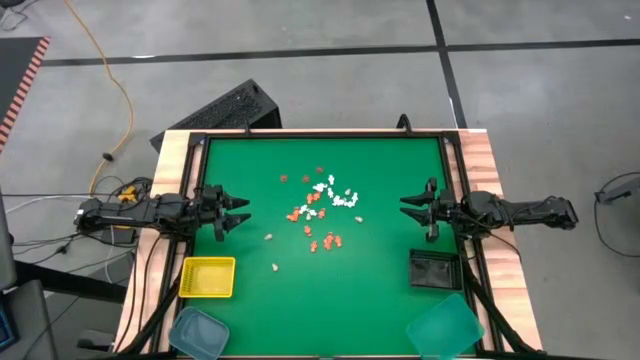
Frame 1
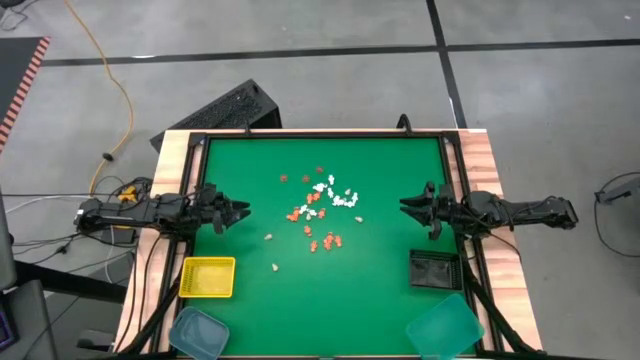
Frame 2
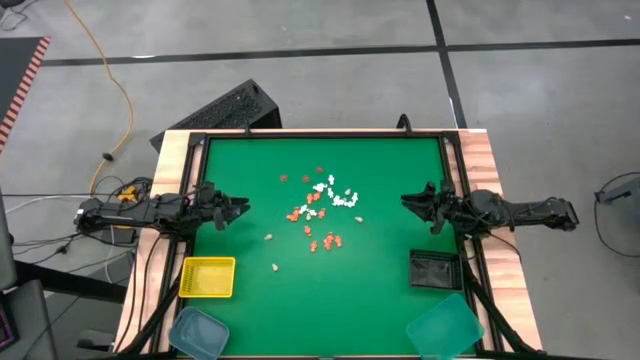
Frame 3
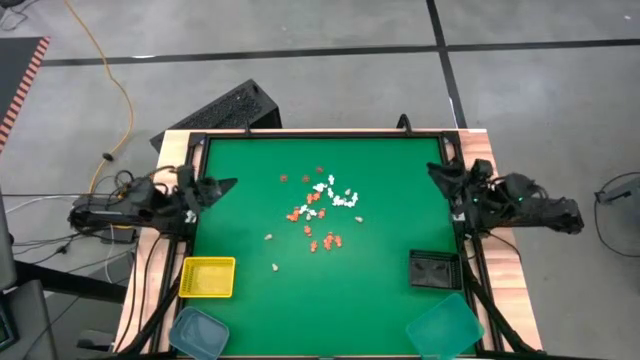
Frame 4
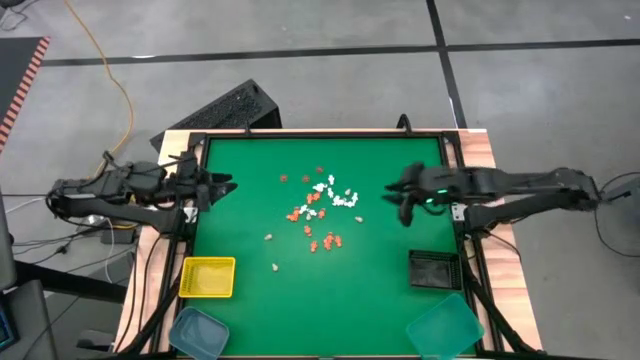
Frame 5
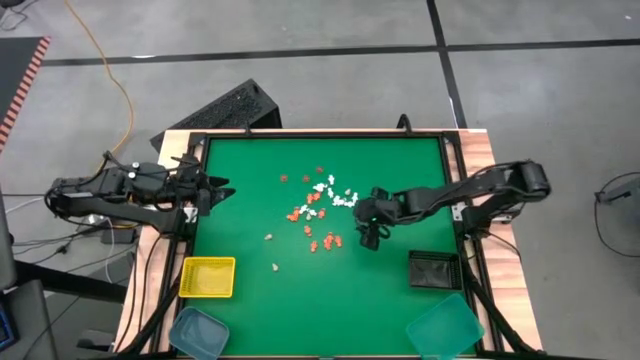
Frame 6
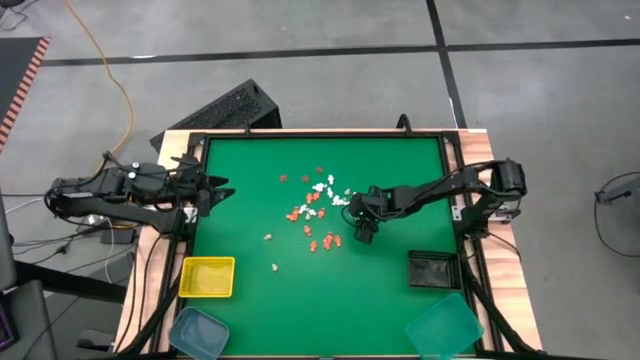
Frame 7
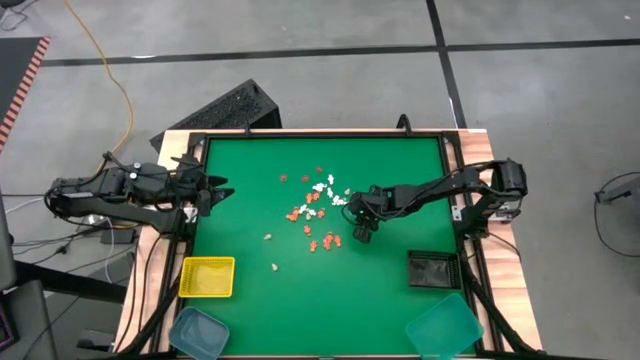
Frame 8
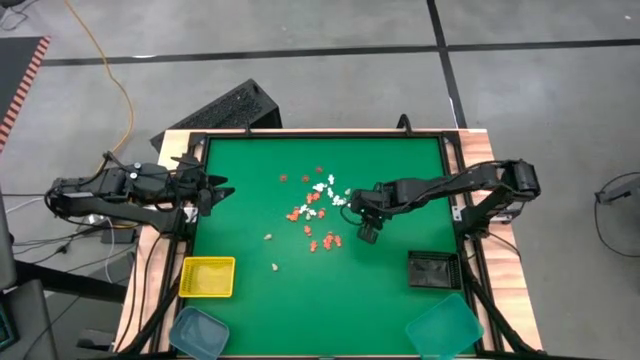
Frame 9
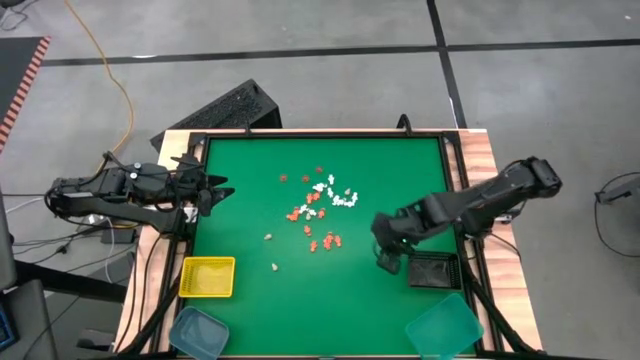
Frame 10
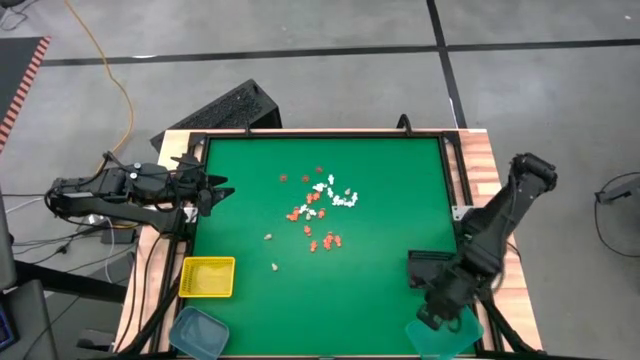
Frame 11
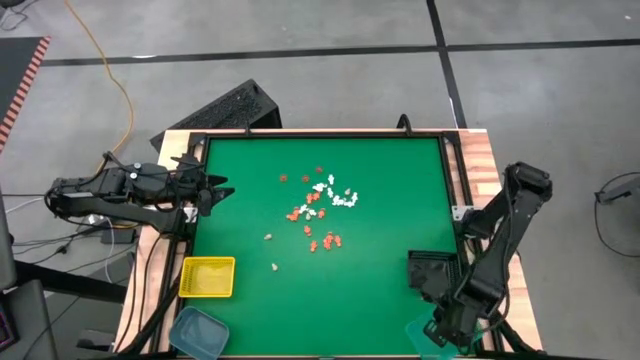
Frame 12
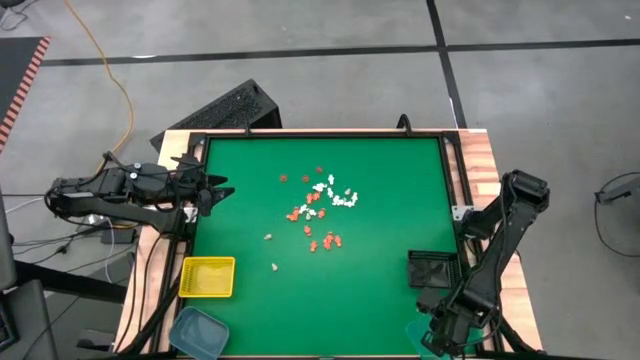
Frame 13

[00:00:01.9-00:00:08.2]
Task: Sort Halloween decoration
Put the skull model into the green bin

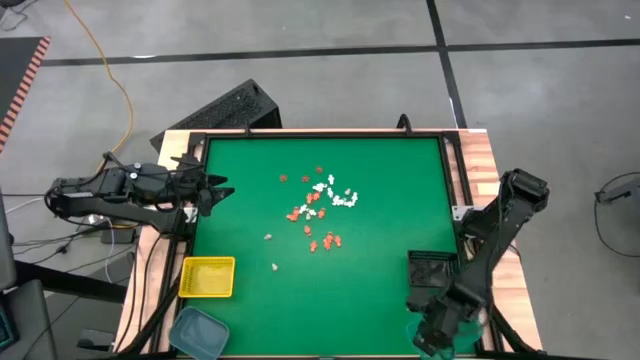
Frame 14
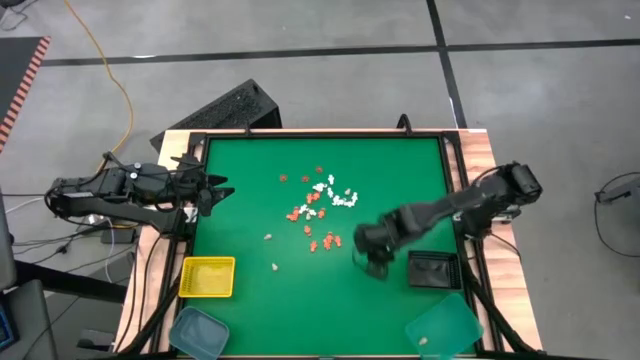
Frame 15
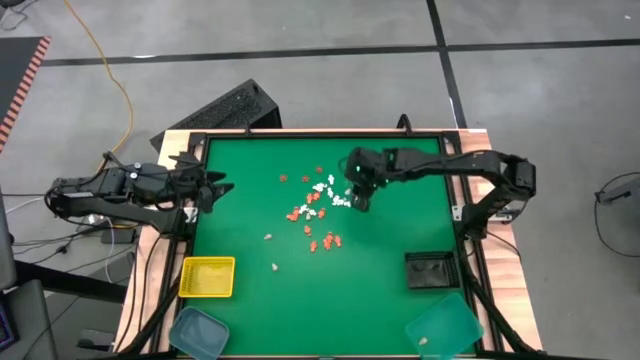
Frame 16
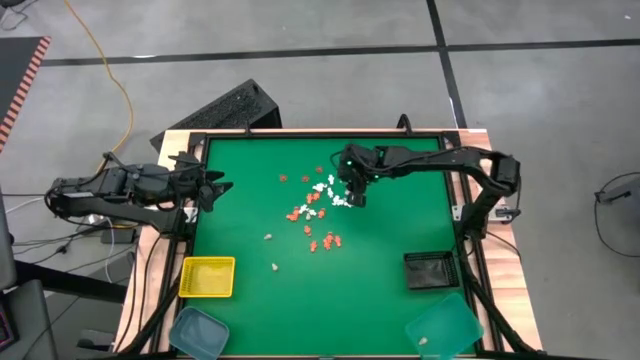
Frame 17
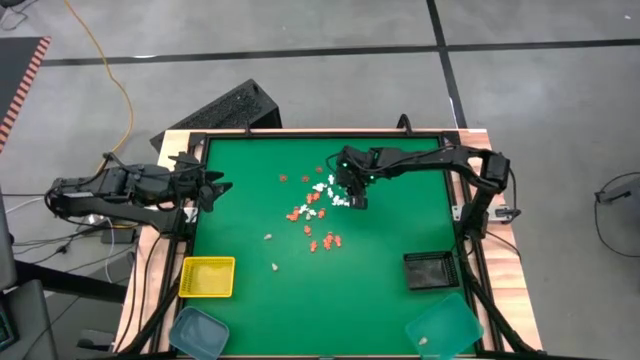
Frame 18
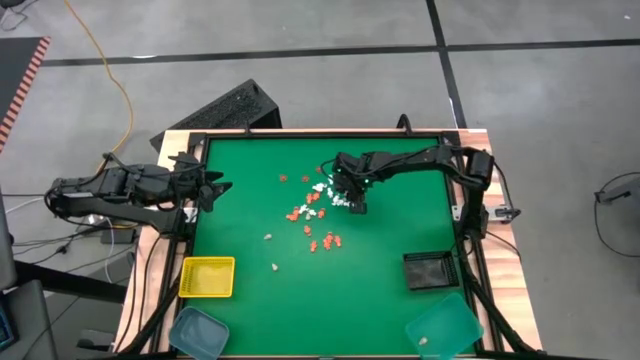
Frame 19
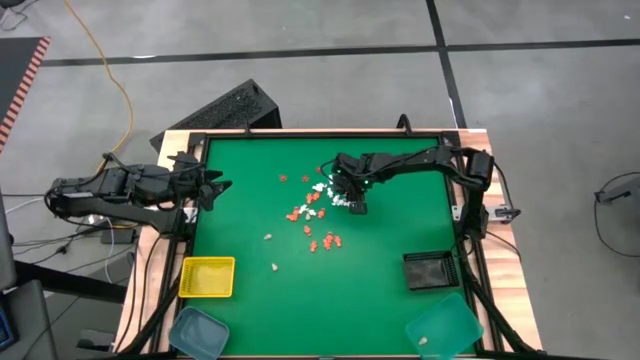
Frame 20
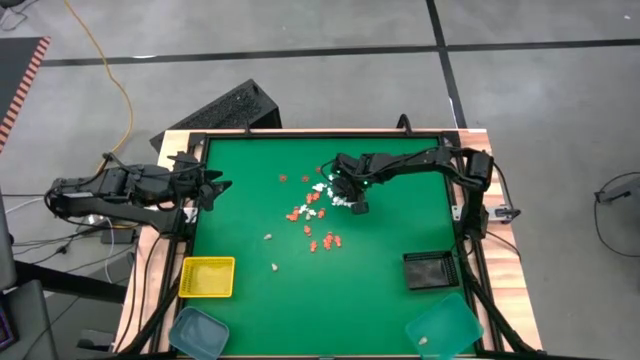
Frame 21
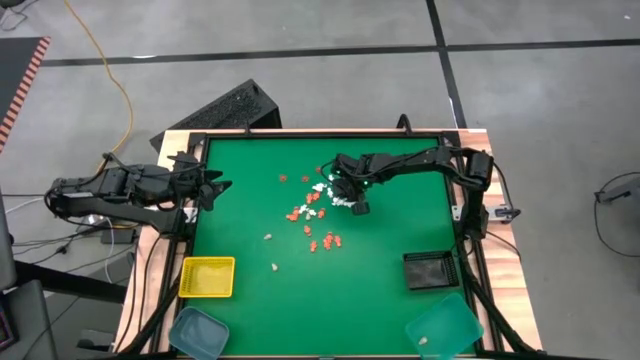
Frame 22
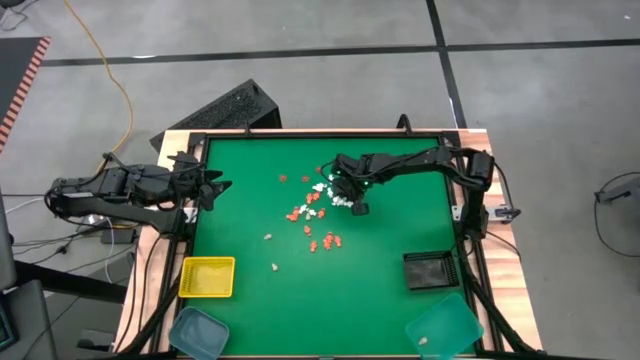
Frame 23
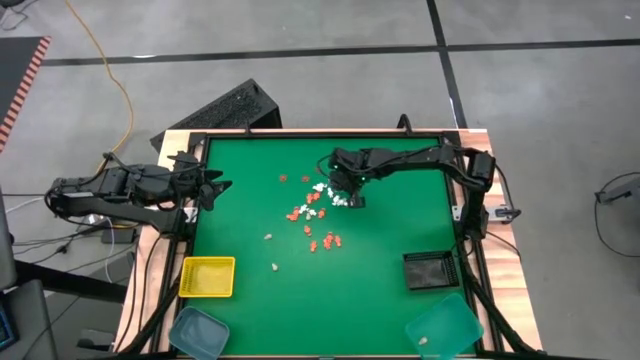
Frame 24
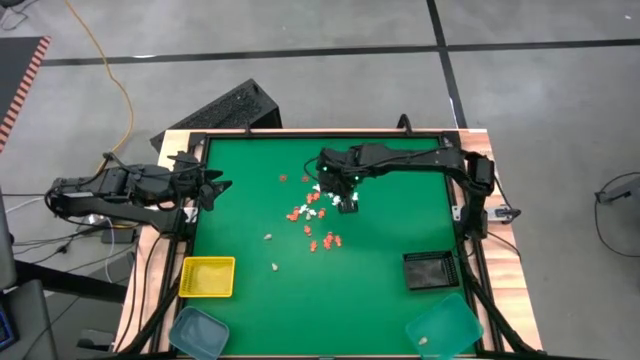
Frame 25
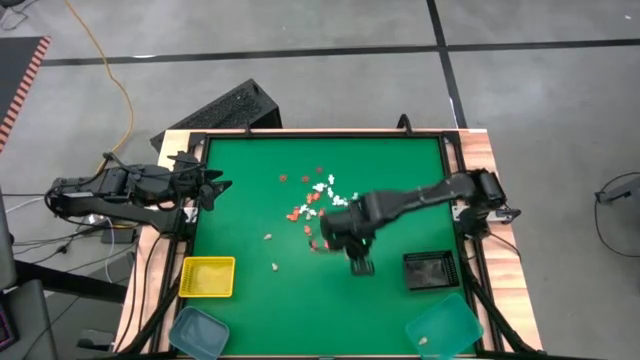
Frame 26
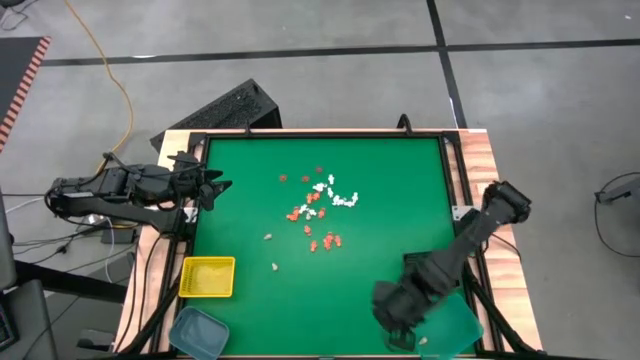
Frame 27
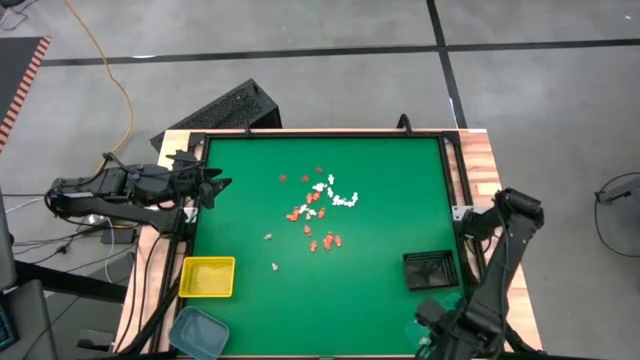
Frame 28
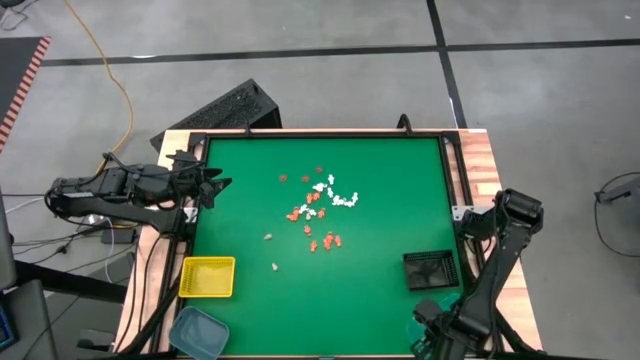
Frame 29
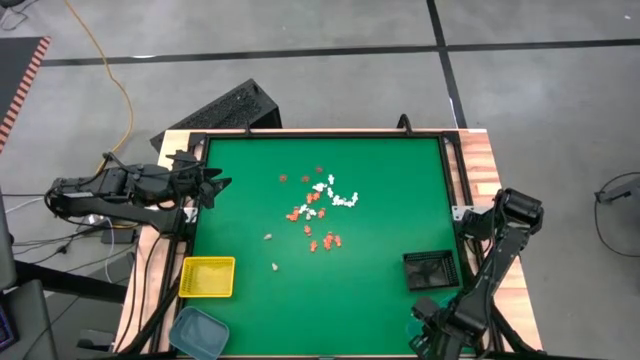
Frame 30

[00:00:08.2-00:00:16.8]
Put the skull model into the green bin

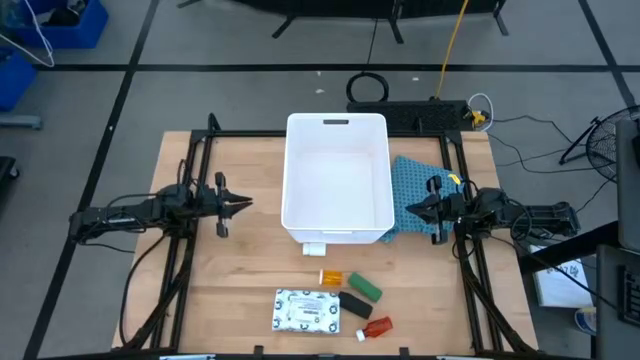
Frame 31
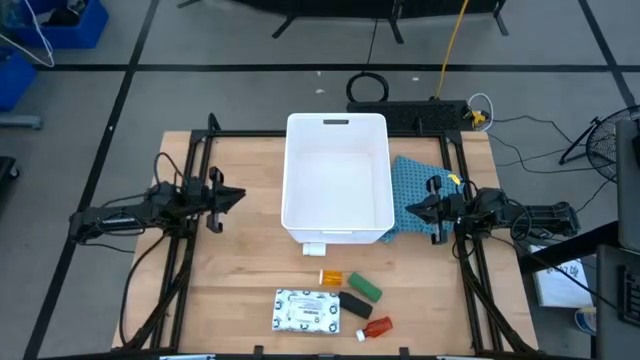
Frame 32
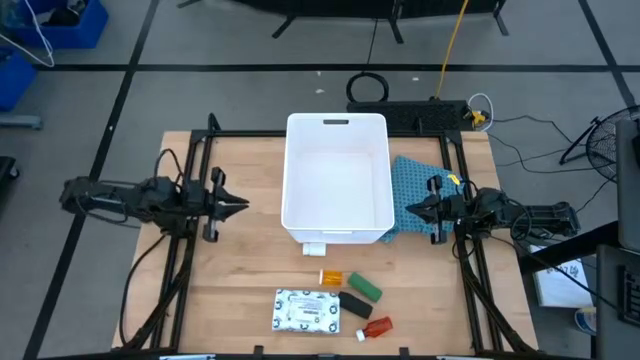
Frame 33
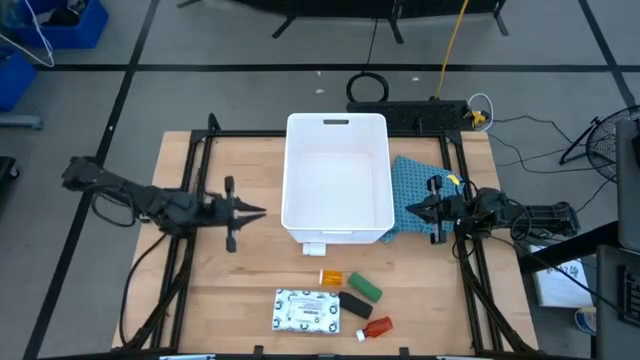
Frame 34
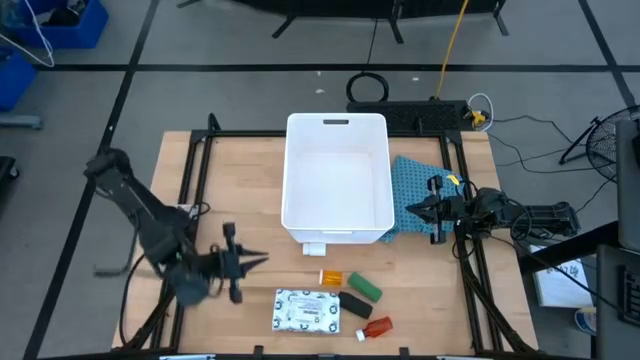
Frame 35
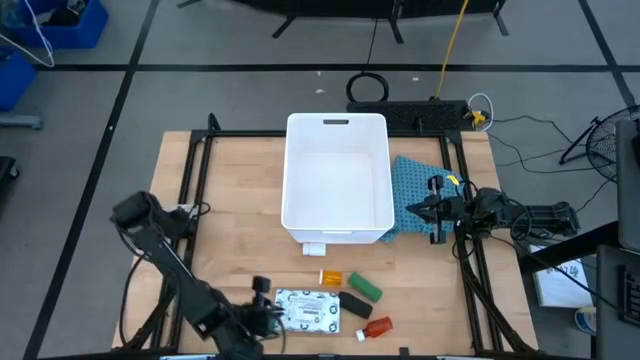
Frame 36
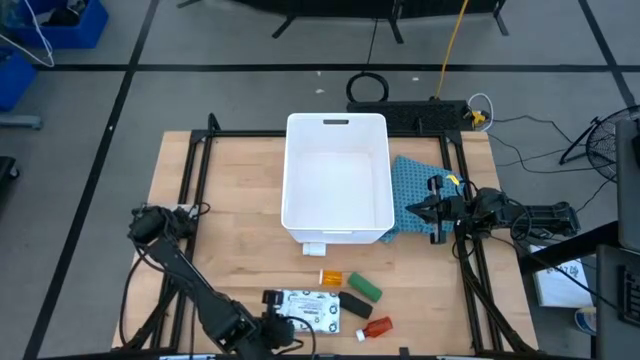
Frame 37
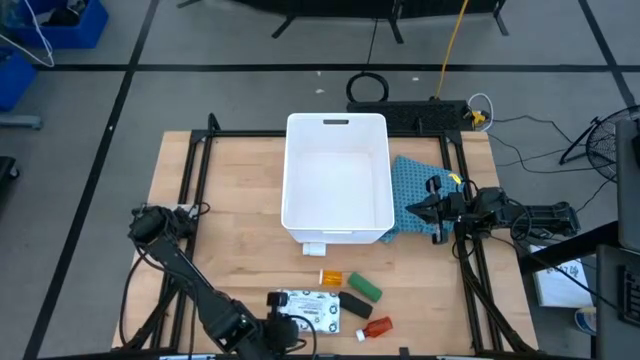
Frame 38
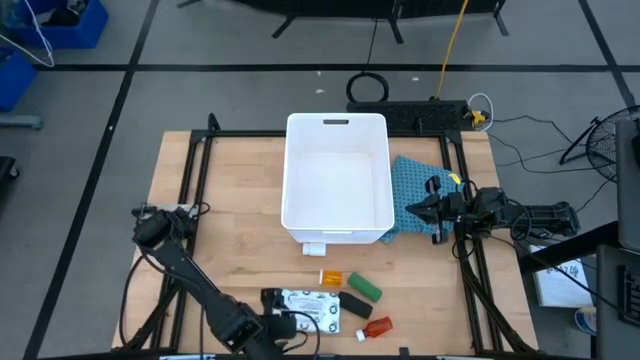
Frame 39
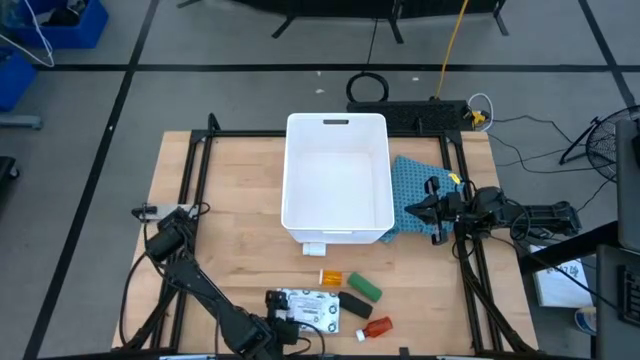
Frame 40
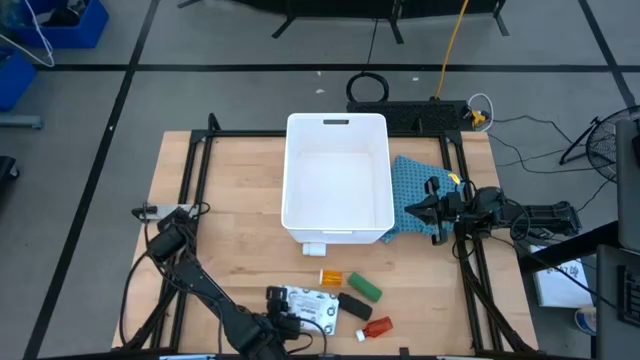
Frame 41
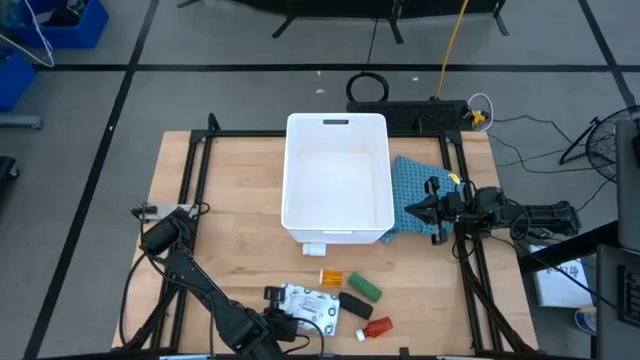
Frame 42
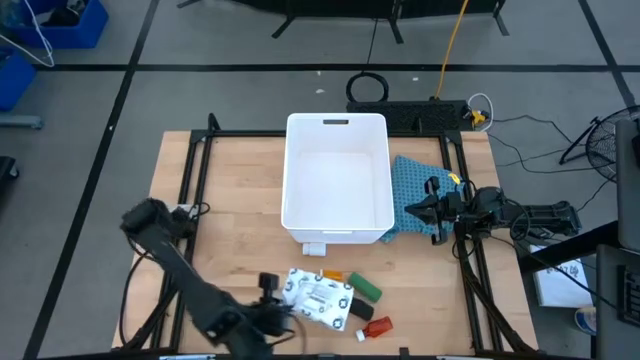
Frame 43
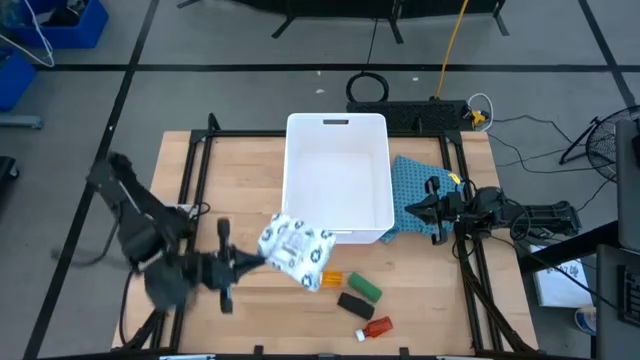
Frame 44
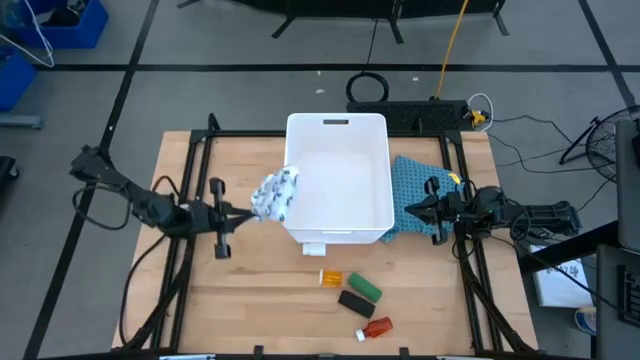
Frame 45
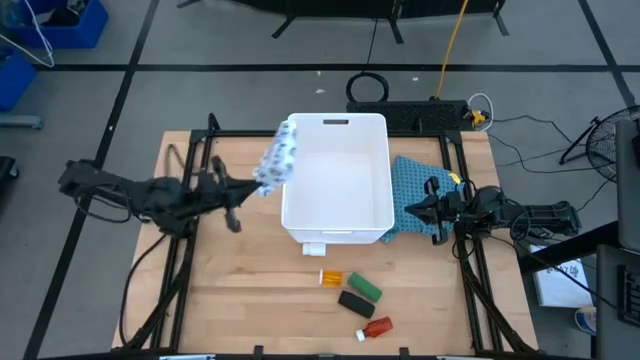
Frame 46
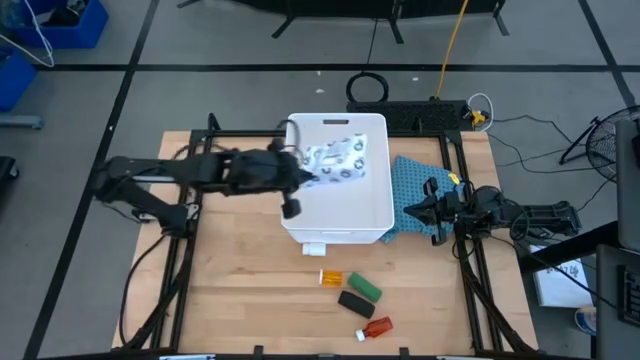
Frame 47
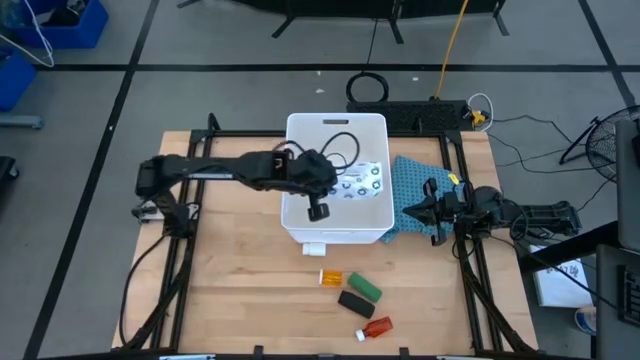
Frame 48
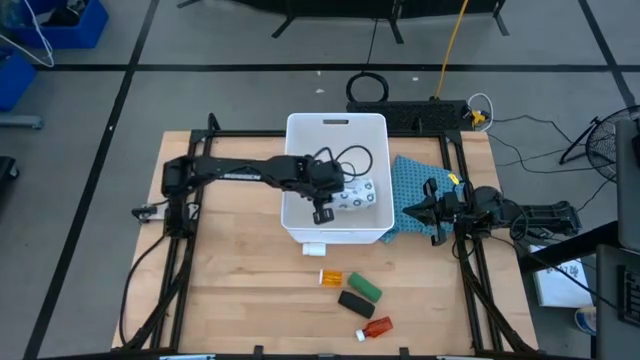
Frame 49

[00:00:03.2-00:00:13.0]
Task: Pick & place medical supplies in basket/bin
Put the white medicine box into the bin
